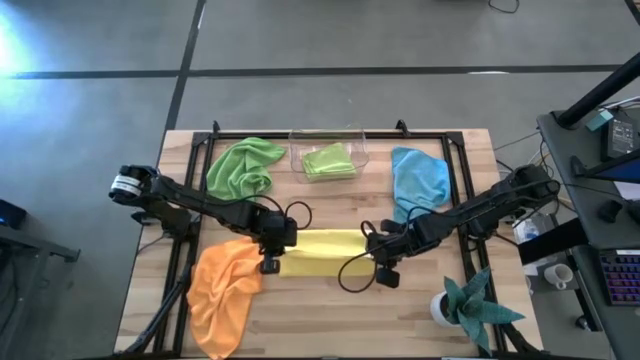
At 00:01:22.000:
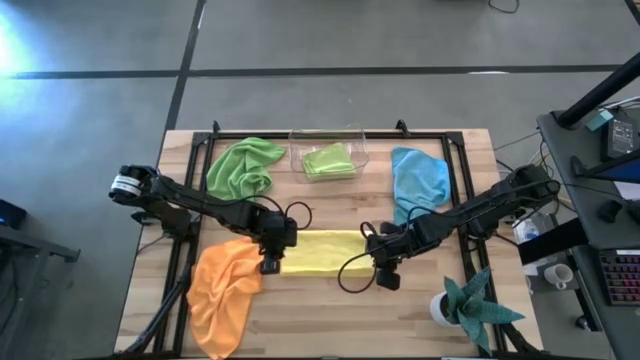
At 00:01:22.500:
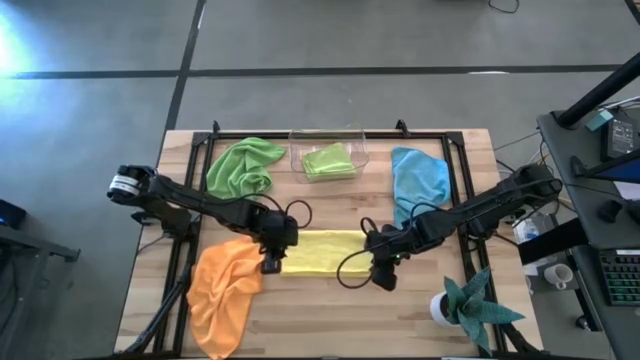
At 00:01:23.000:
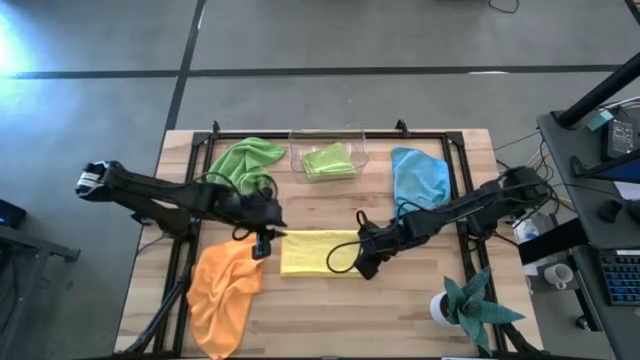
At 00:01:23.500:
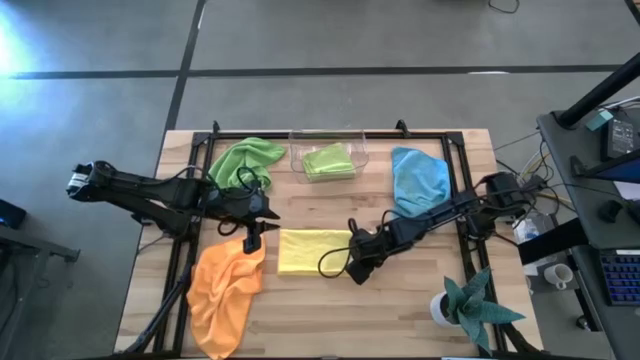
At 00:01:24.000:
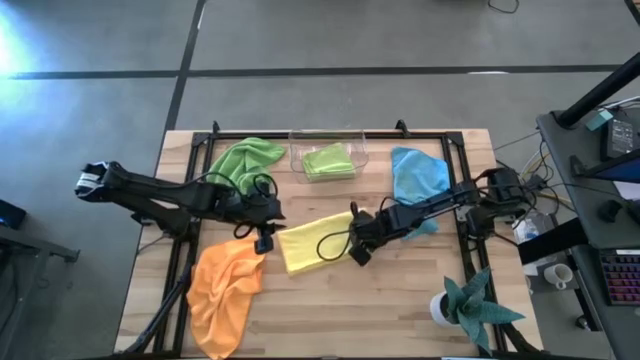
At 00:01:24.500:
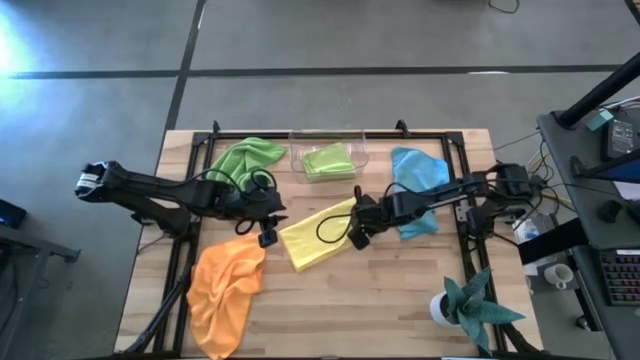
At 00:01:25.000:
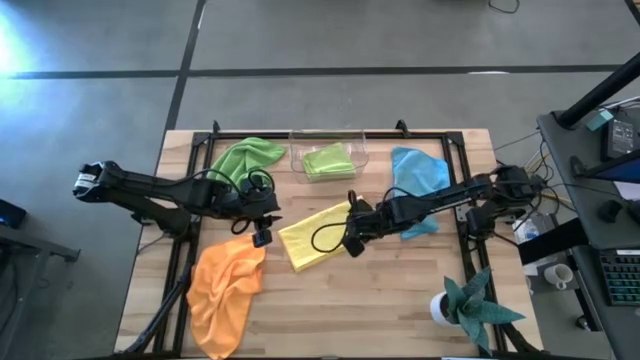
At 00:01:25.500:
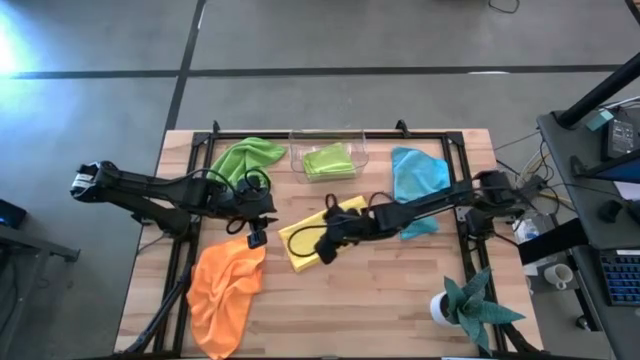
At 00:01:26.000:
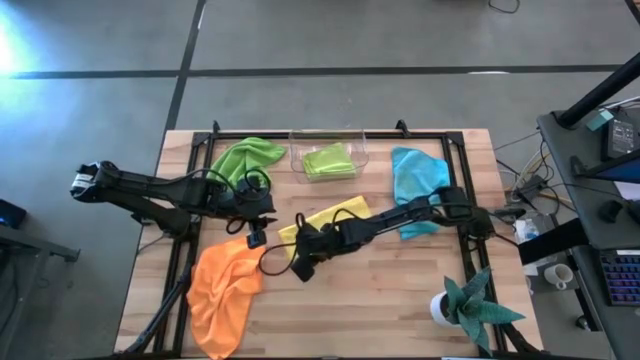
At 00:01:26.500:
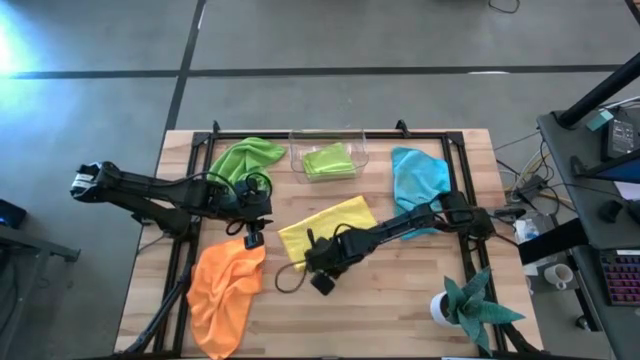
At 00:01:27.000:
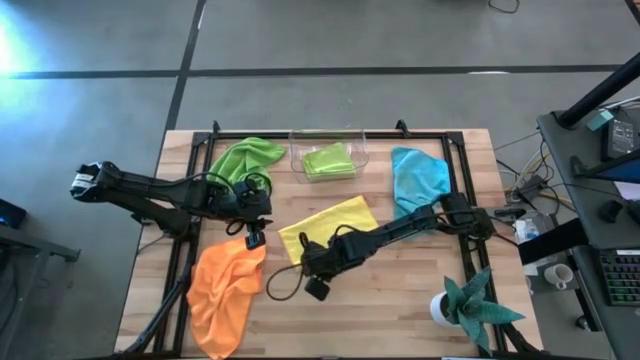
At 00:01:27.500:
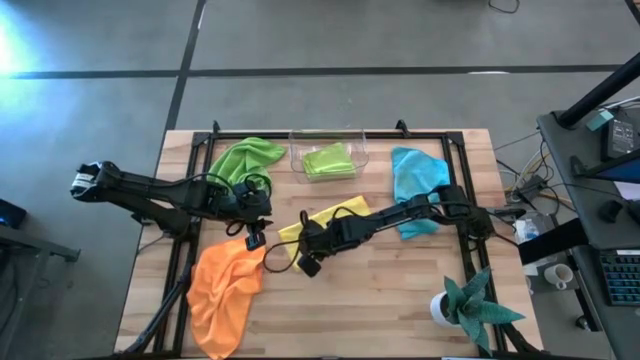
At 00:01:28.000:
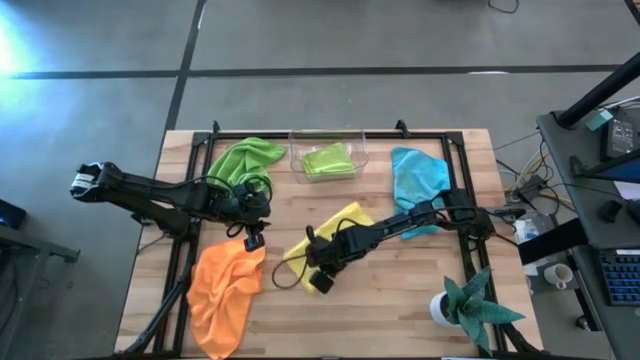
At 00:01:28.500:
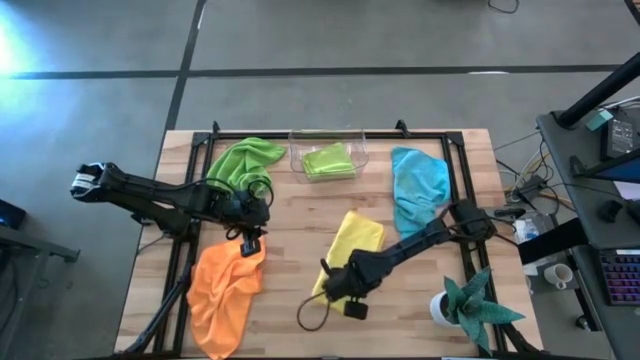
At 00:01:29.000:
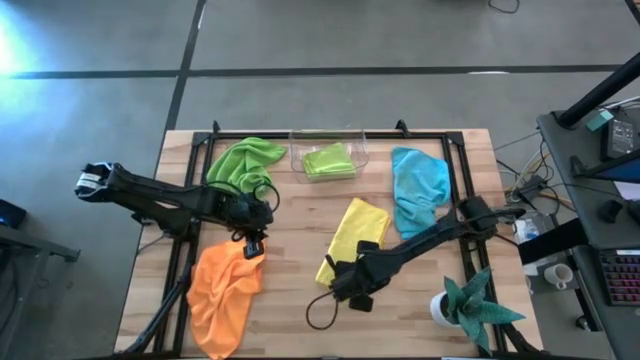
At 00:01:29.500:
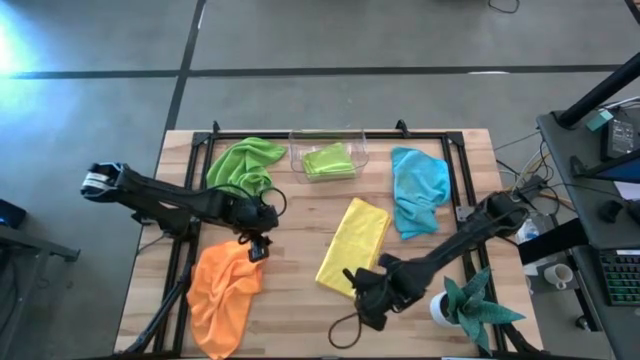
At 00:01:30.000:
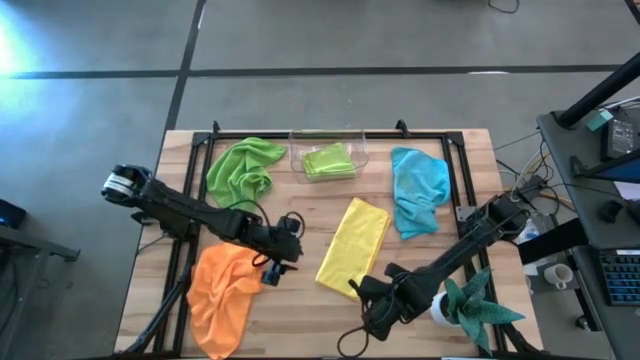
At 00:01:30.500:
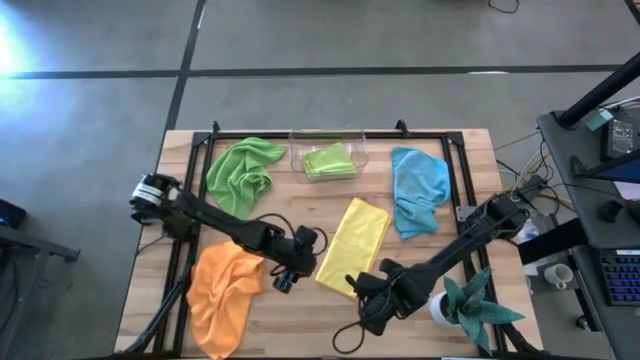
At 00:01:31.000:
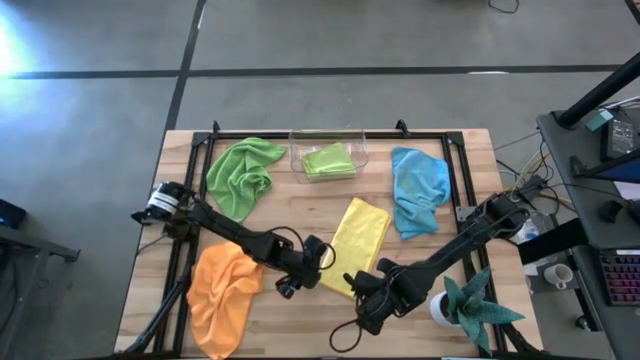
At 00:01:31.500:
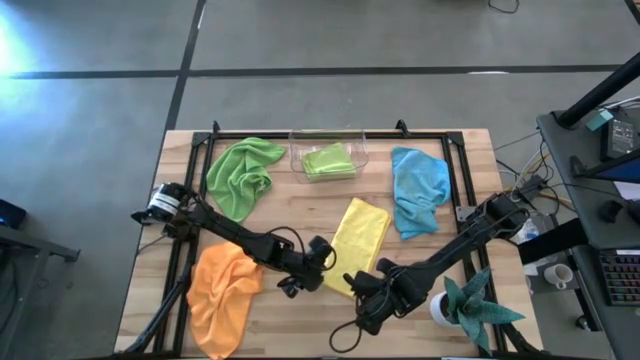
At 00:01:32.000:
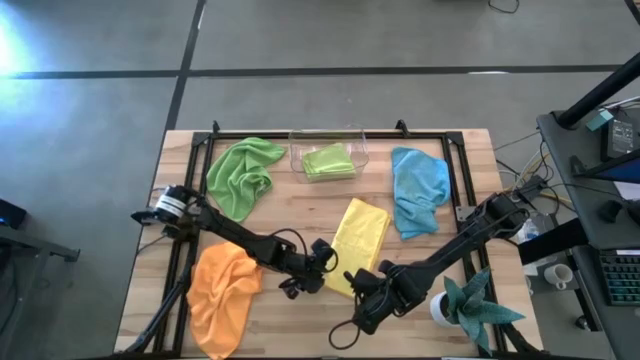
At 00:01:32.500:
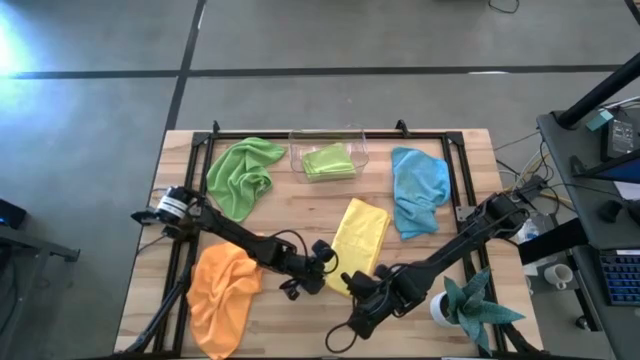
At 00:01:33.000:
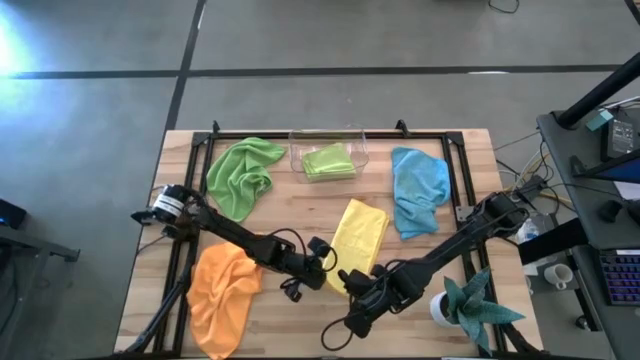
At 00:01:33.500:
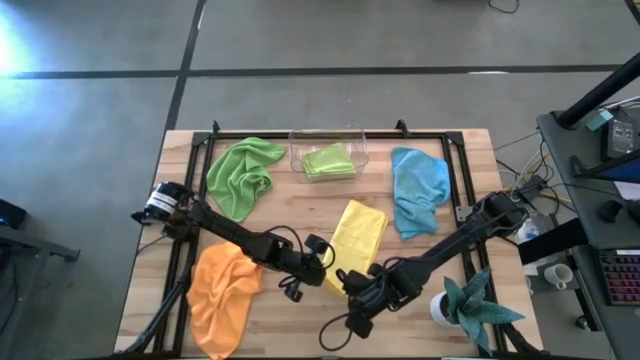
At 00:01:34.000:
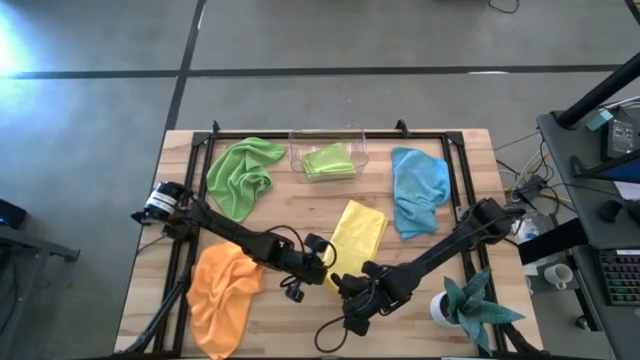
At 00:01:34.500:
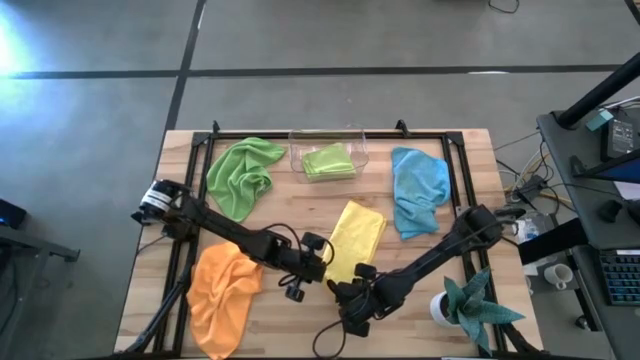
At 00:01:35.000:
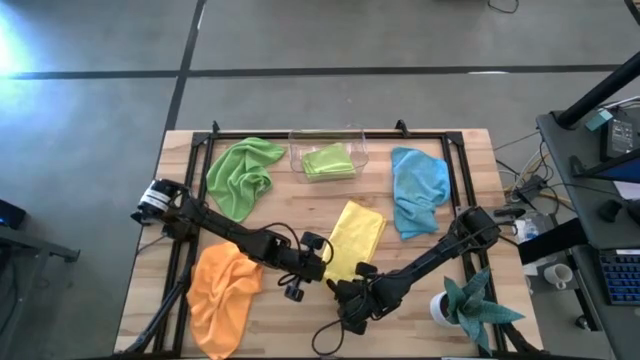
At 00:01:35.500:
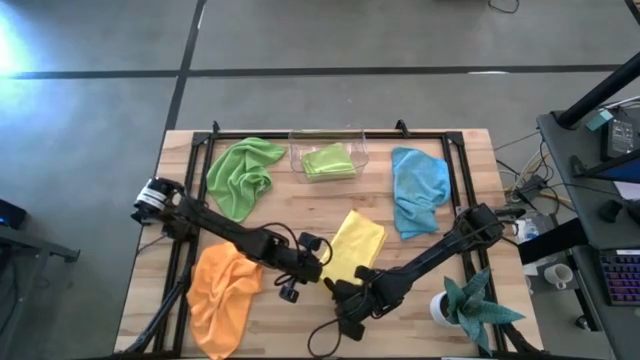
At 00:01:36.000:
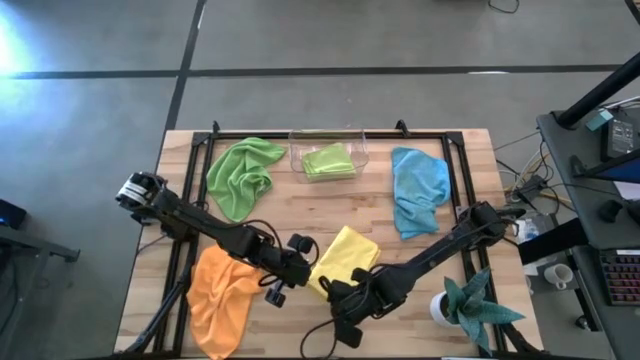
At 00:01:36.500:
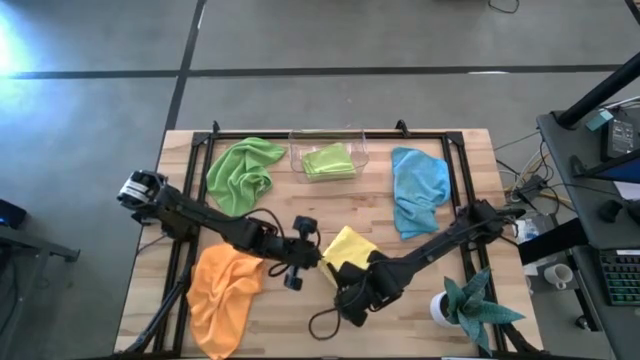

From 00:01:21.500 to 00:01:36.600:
Task: Fold microfiber towels
Fold the yellow microfiber towel

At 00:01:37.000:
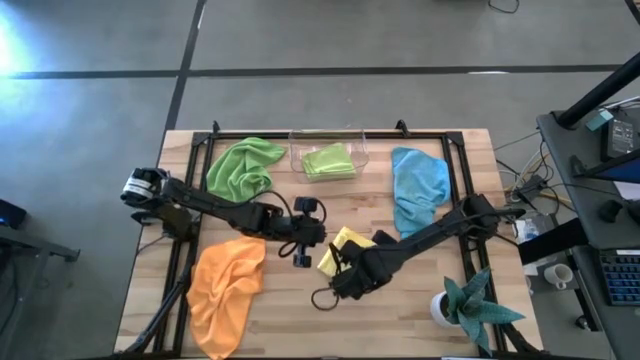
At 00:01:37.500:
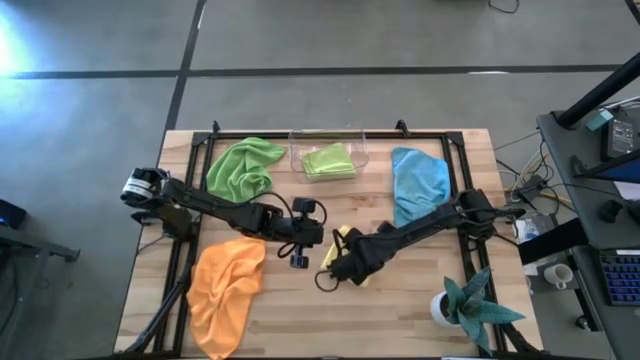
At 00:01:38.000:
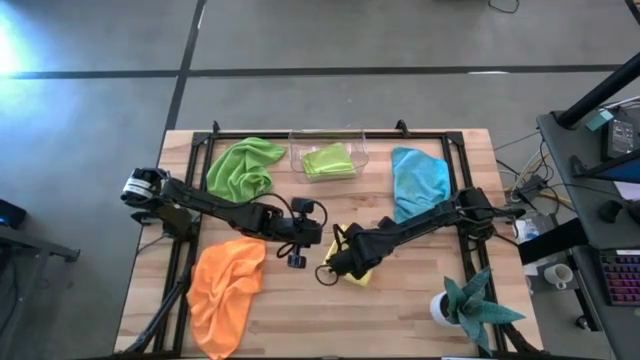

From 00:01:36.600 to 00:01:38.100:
Fold the yellow microfiber towel

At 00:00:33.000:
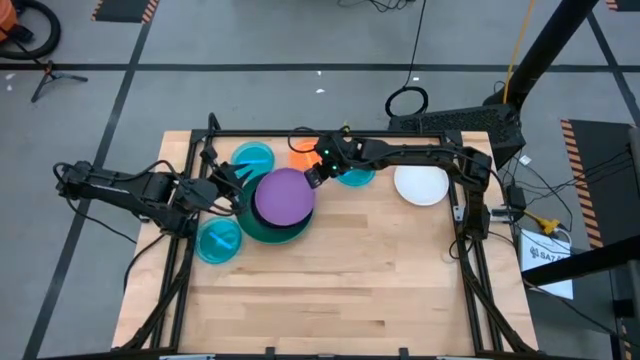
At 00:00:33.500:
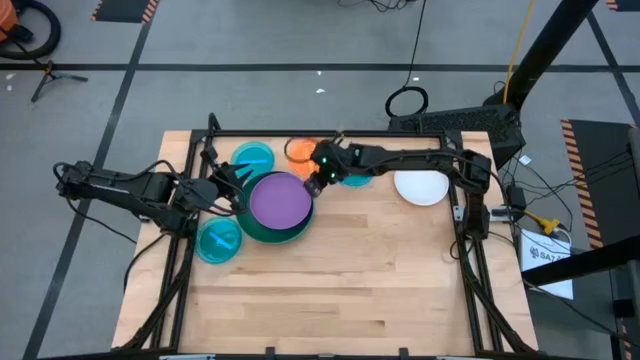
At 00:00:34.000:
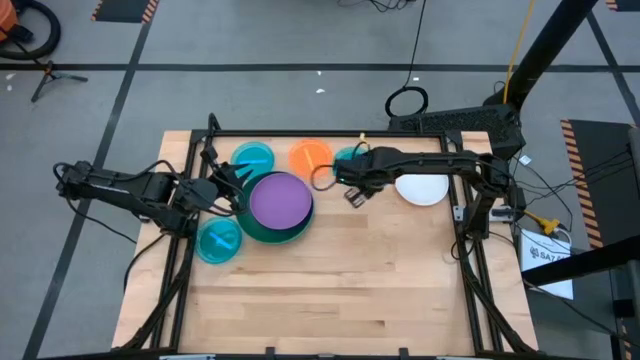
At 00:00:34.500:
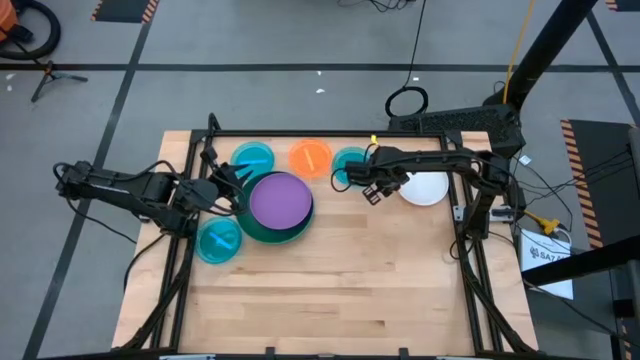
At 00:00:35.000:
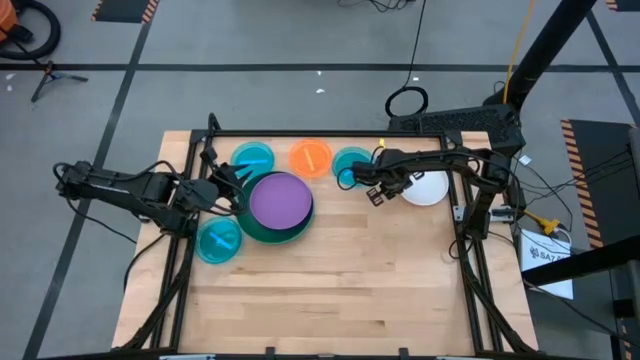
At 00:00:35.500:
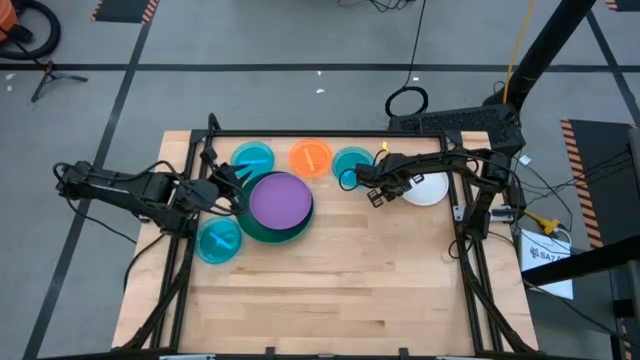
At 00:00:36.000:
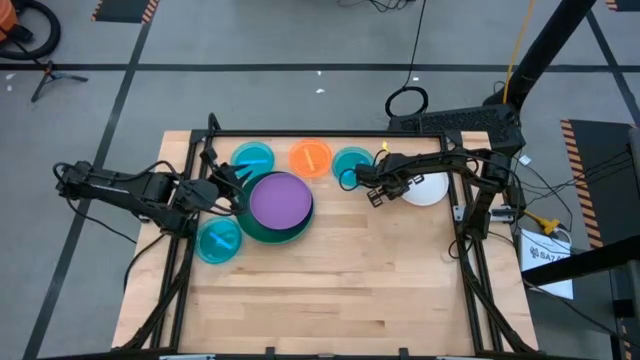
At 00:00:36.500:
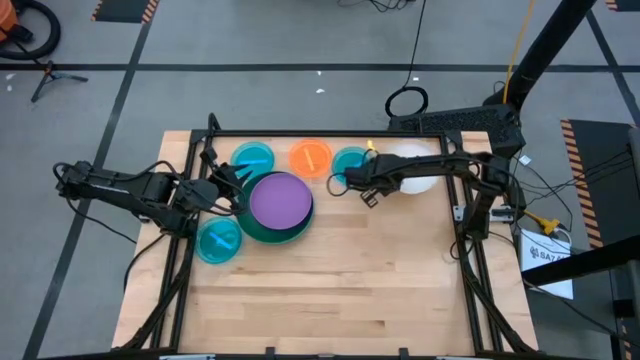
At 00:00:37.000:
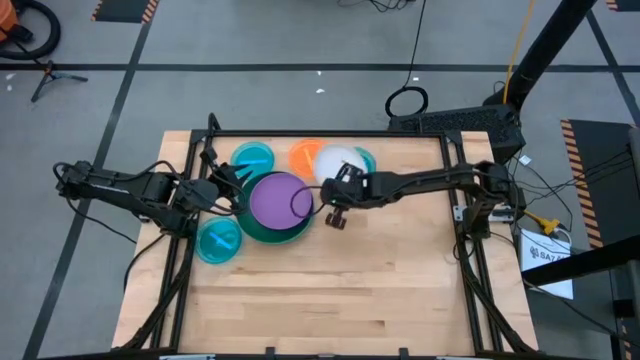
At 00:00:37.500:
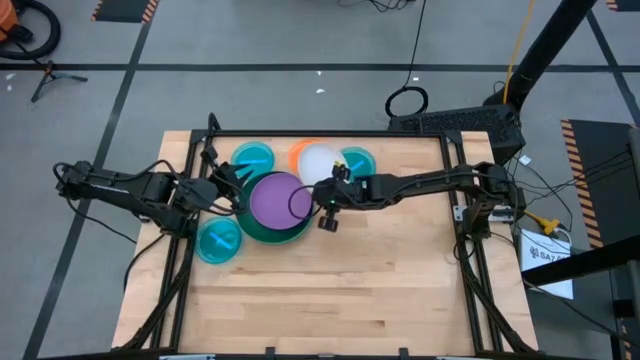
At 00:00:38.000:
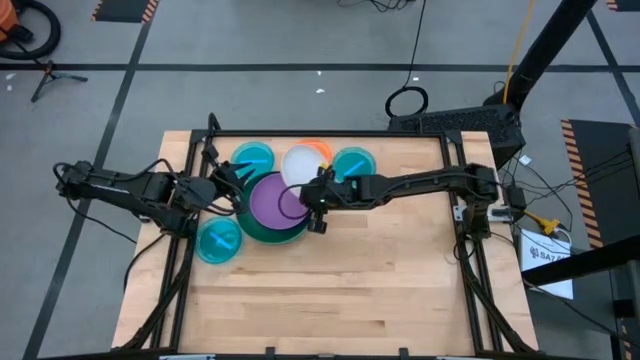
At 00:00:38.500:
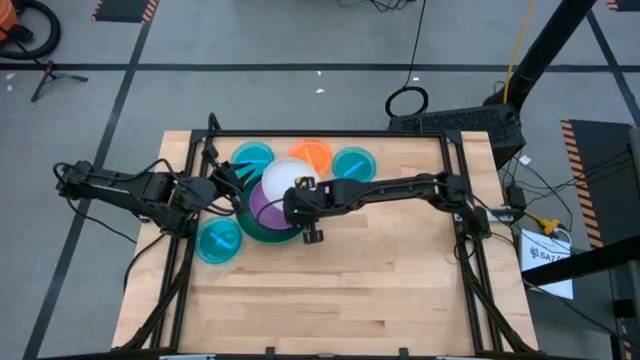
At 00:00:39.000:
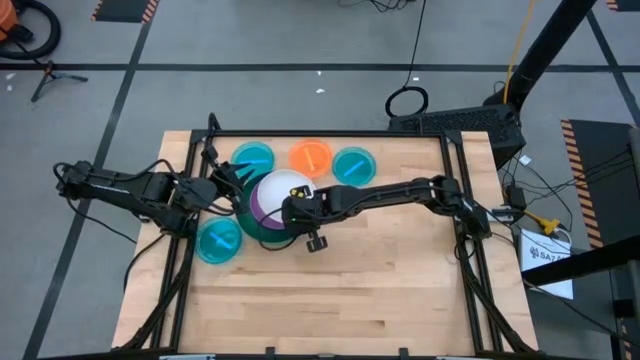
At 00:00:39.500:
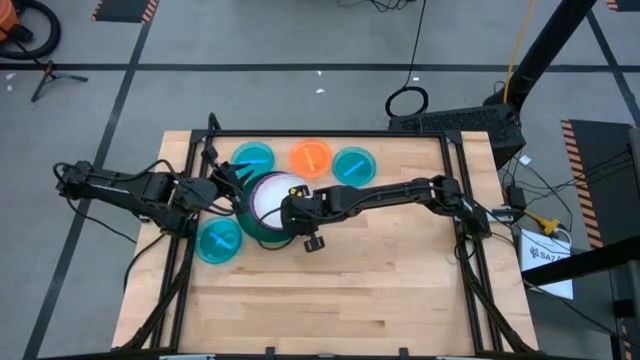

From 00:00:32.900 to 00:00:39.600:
Task: Stack plastic plates
Stack the white plate on top of the purple plate
